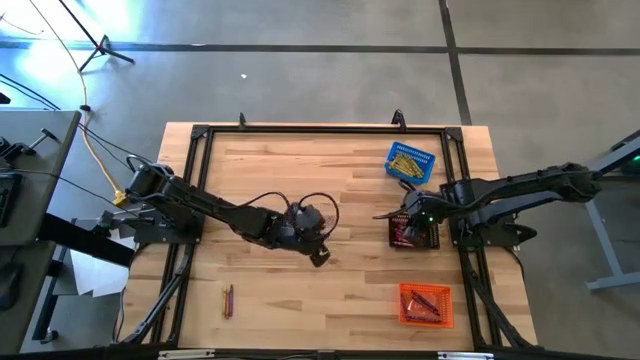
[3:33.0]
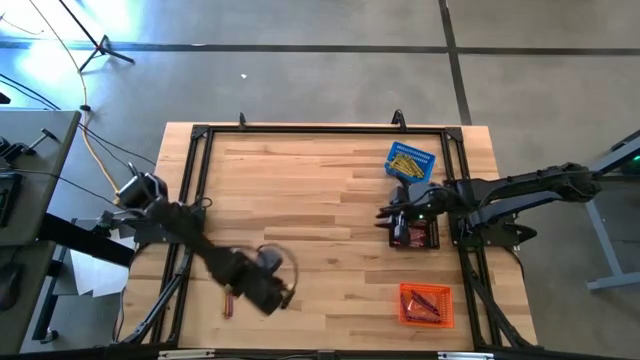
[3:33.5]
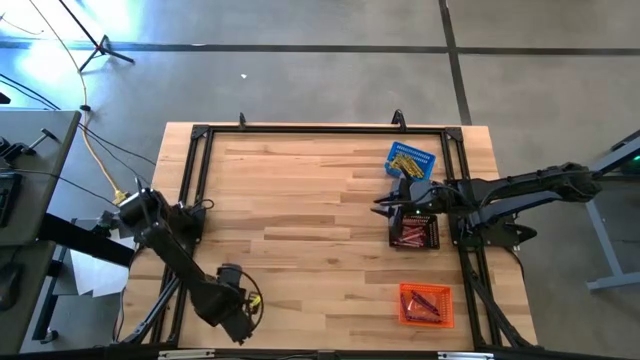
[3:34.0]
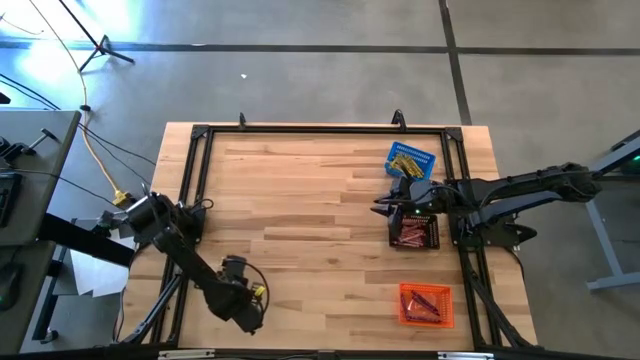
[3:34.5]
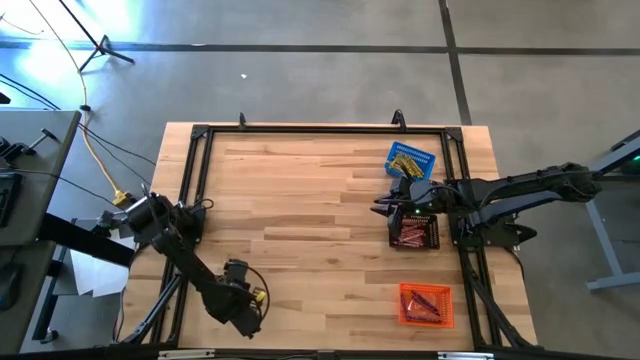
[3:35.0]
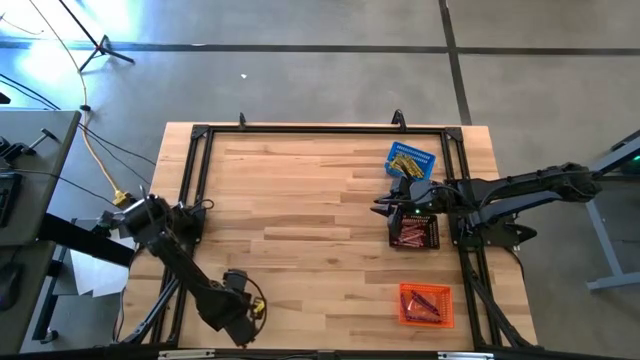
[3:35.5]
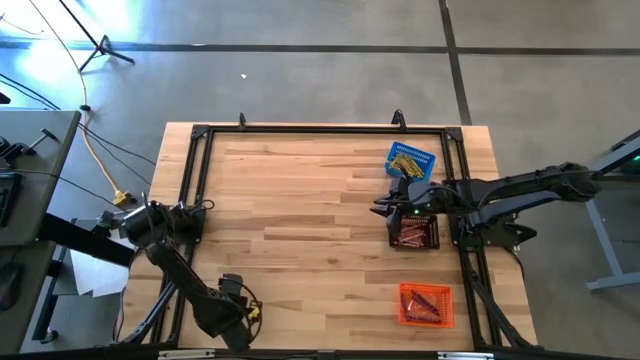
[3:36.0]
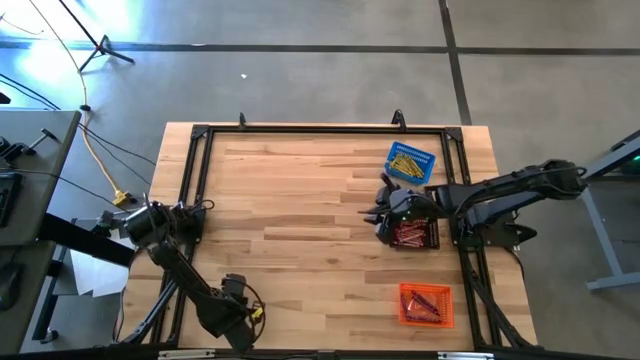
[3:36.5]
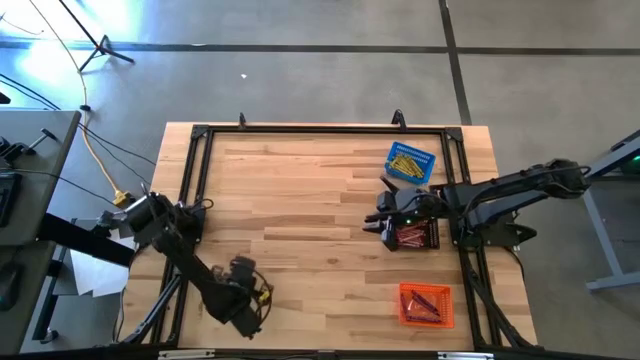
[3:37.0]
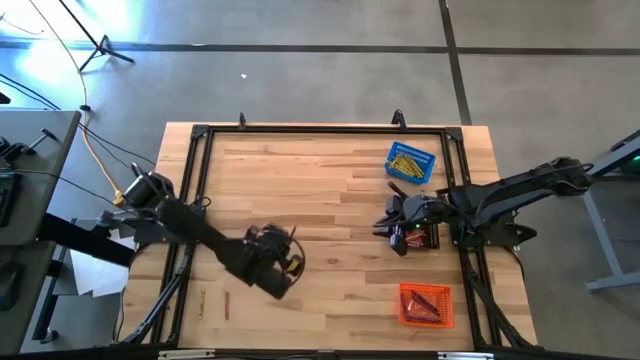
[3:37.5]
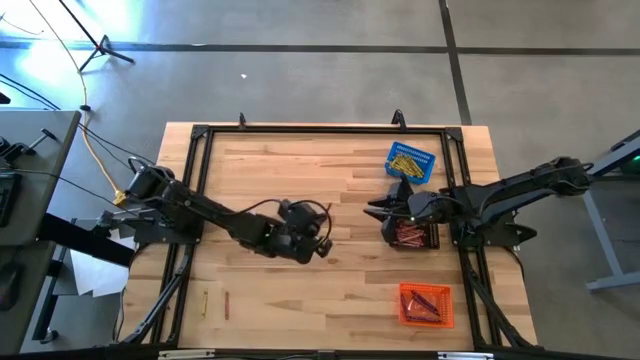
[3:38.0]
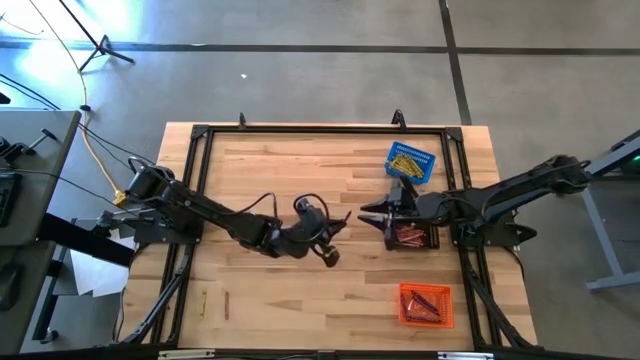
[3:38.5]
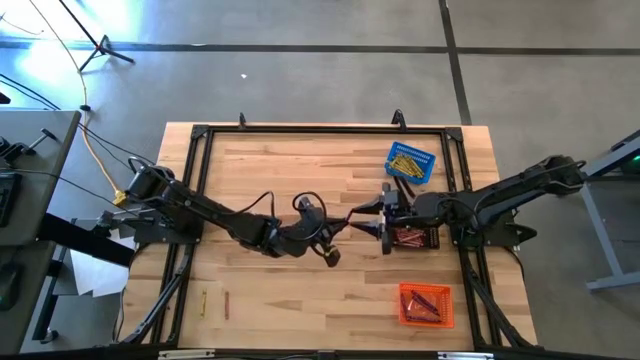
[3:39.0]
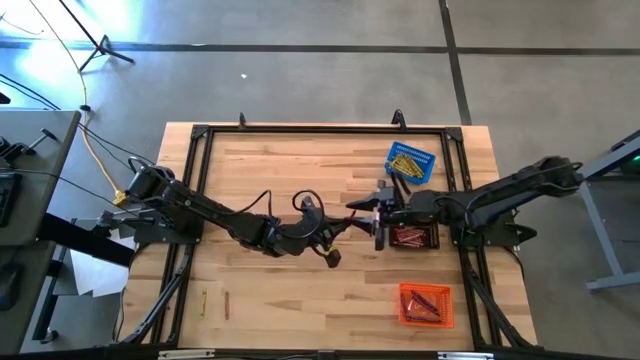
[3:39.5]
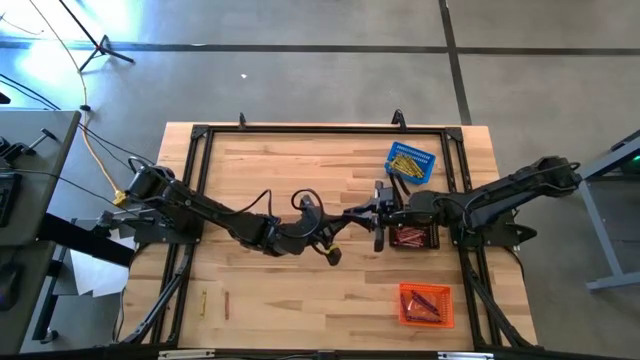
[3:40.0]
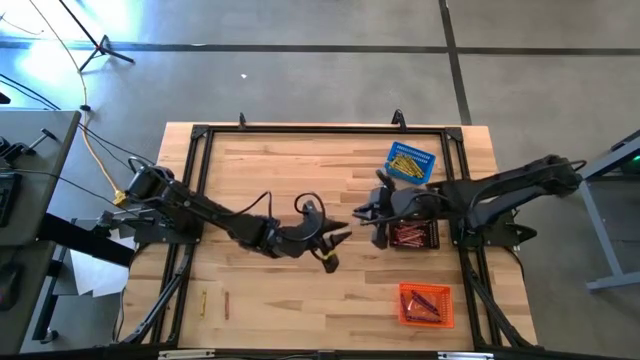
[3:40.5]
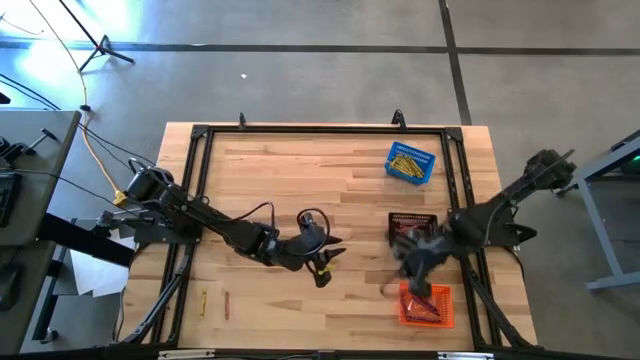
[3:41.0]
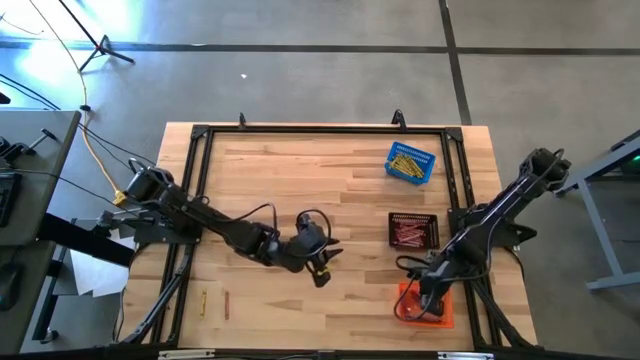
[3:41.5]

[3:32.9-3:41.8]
Task: Sort crayons
Put the violet crayon into the orange bin

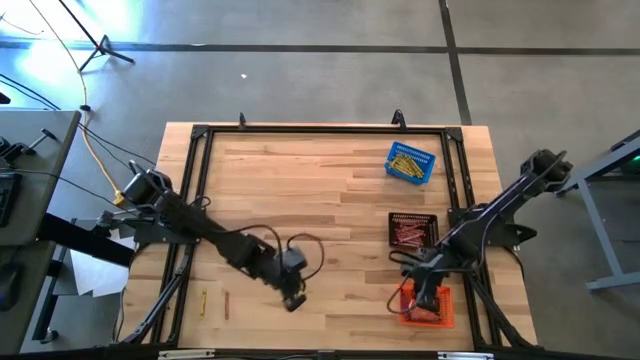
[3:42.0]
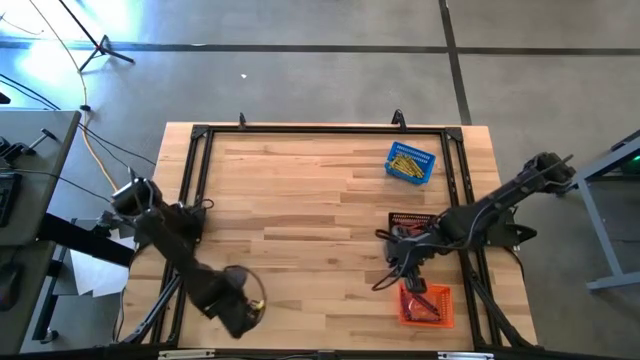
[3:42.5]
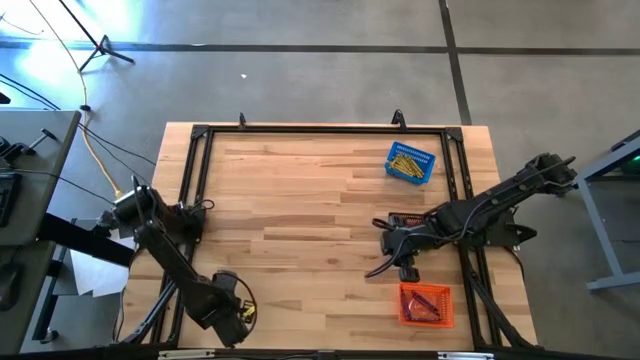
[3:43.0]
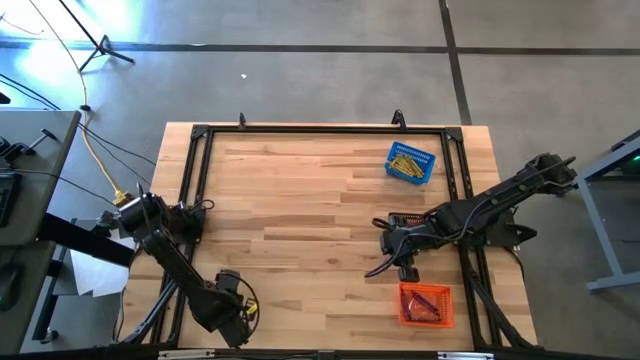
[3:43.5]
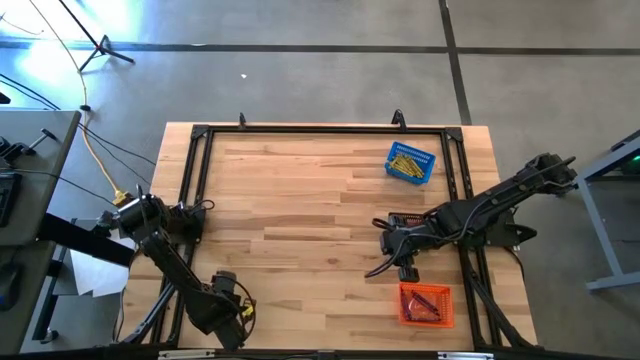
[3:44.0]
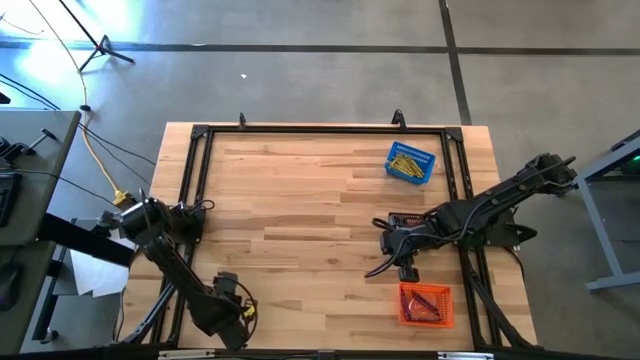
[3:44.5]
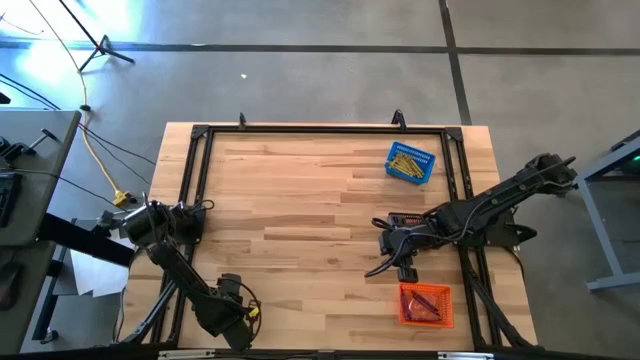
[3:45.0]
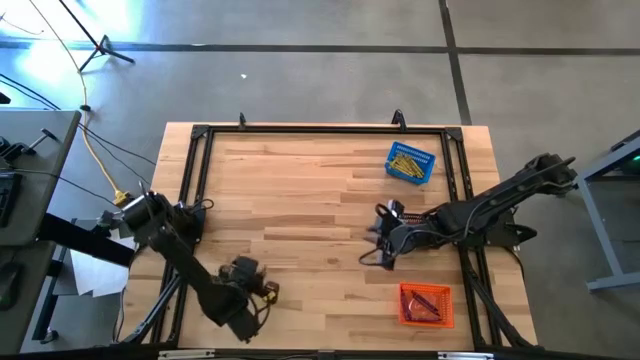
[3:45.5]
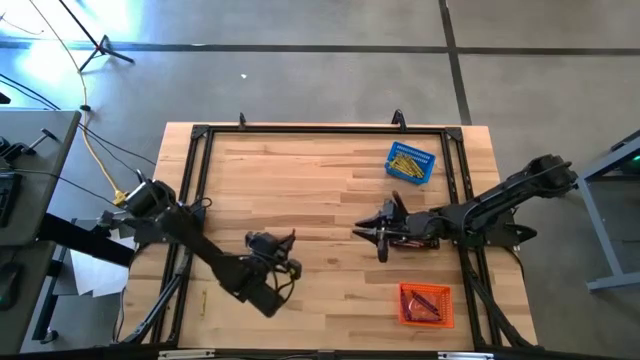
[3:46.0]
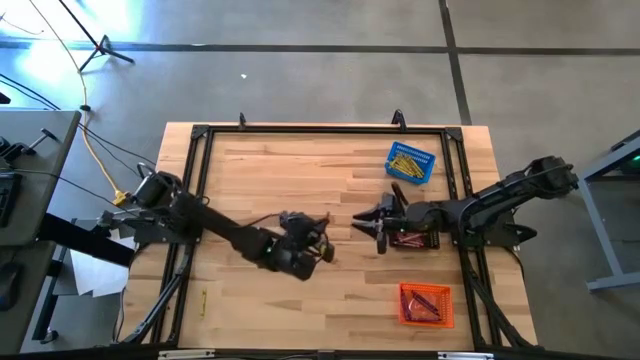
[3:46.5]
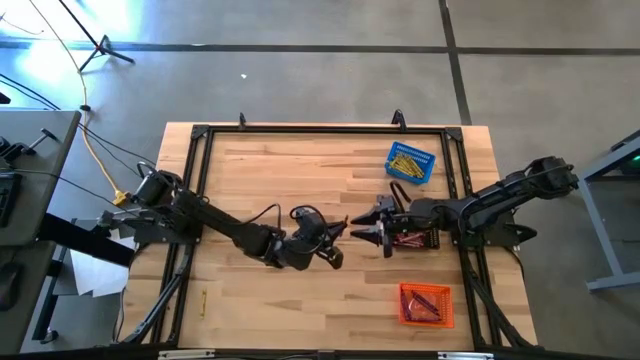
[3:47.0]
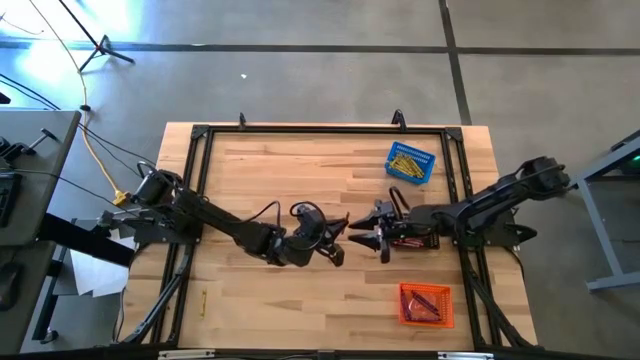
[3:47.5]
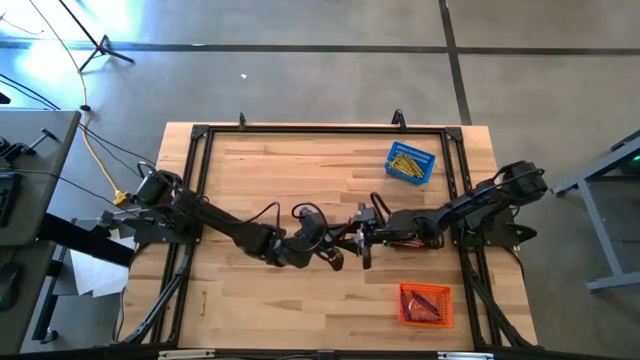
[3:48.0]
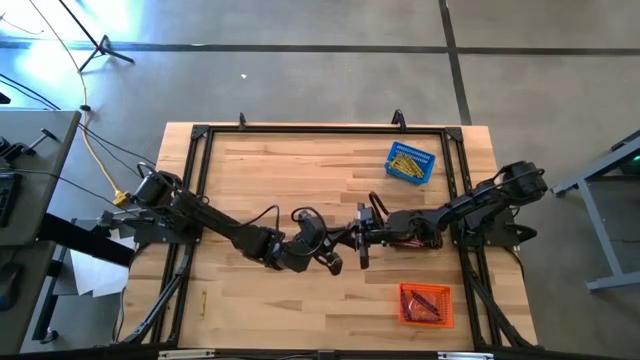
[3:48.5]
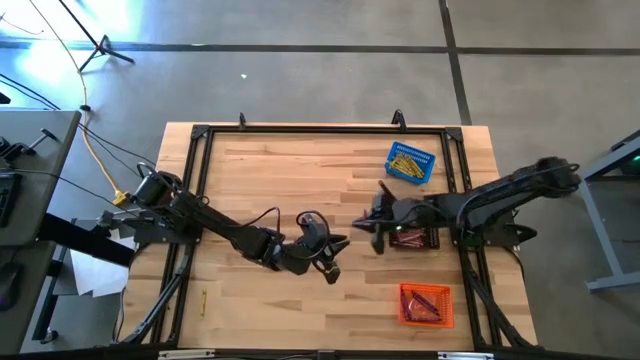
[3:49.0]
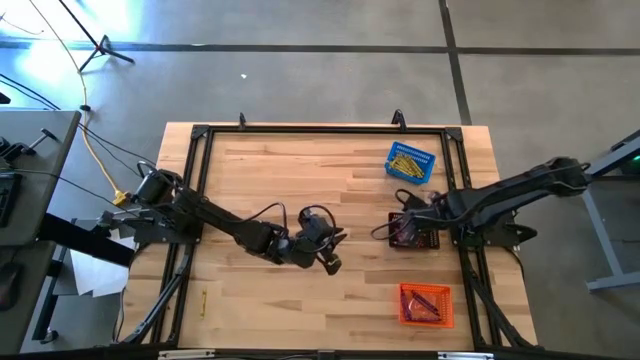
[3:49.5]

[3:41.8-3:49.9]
Put the red crayon into the black bin

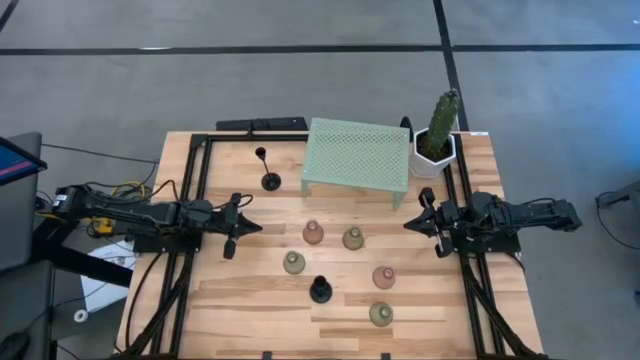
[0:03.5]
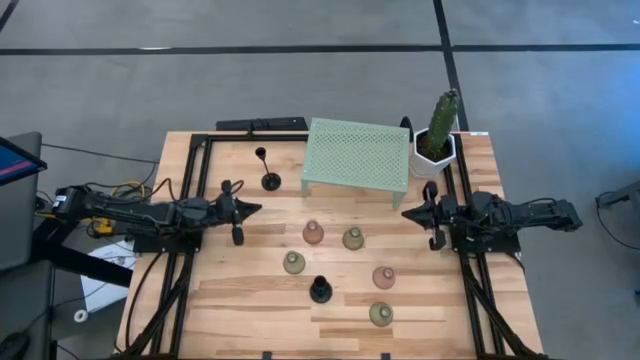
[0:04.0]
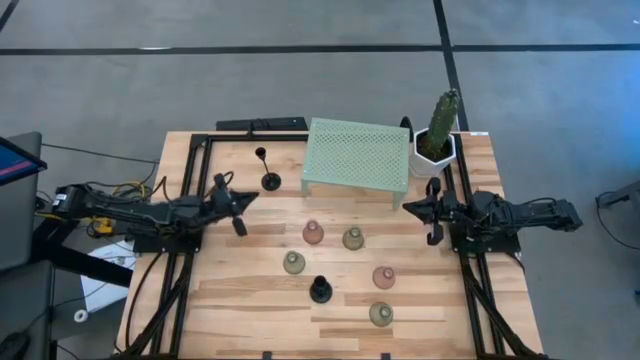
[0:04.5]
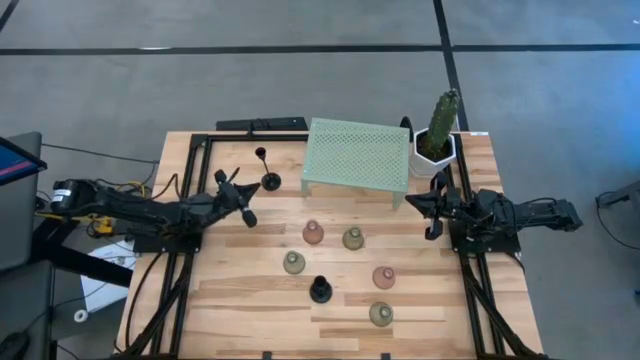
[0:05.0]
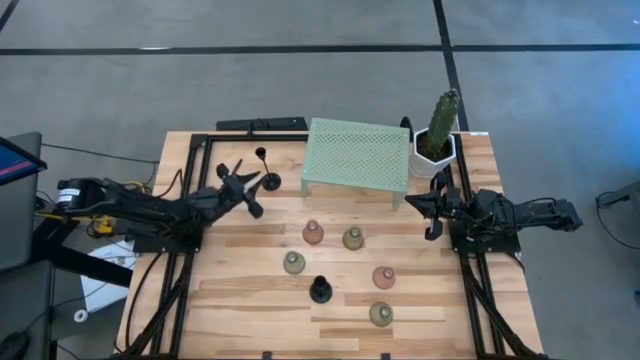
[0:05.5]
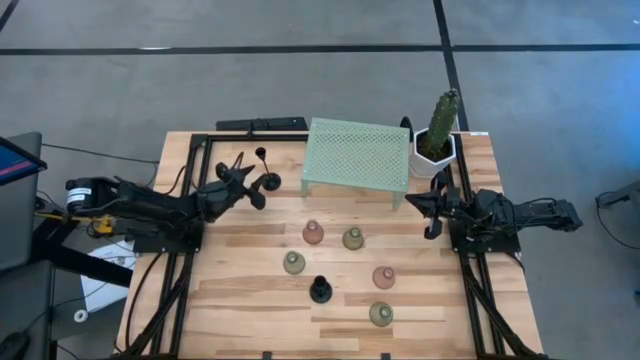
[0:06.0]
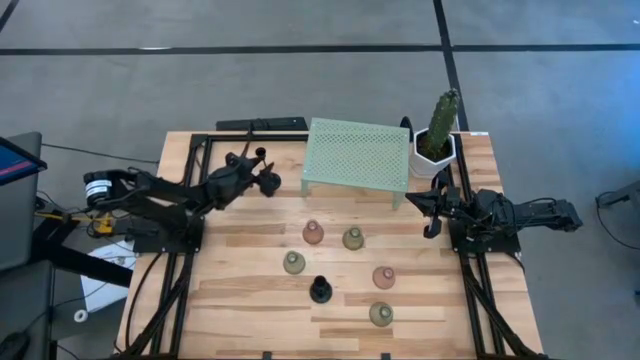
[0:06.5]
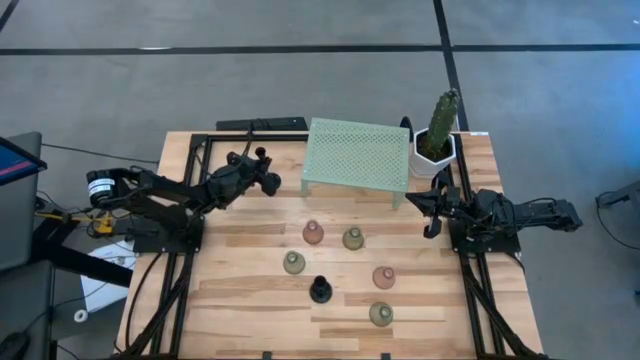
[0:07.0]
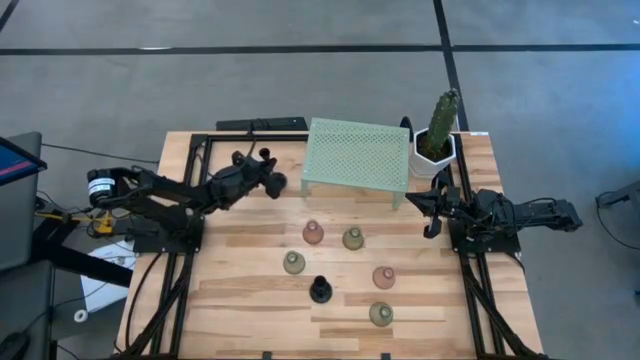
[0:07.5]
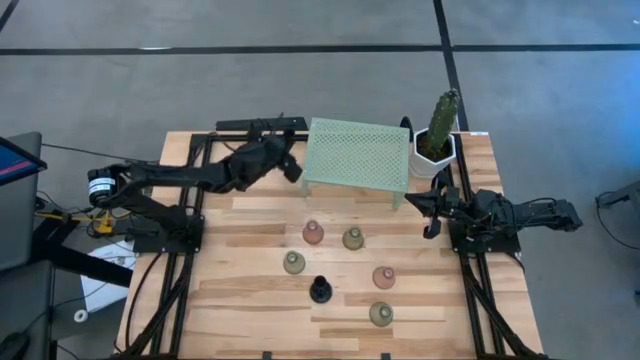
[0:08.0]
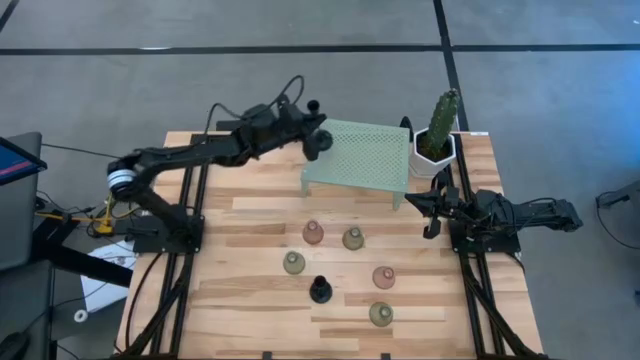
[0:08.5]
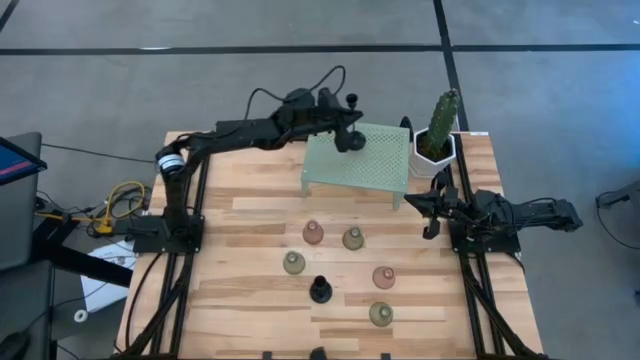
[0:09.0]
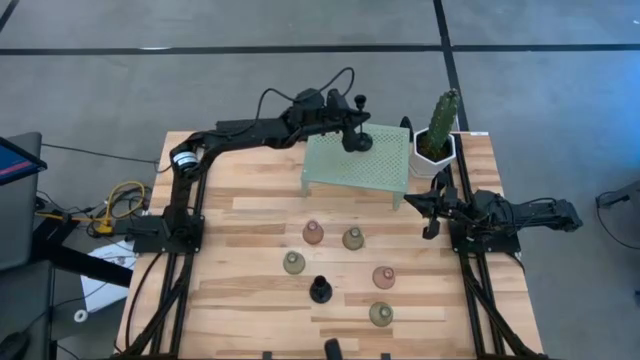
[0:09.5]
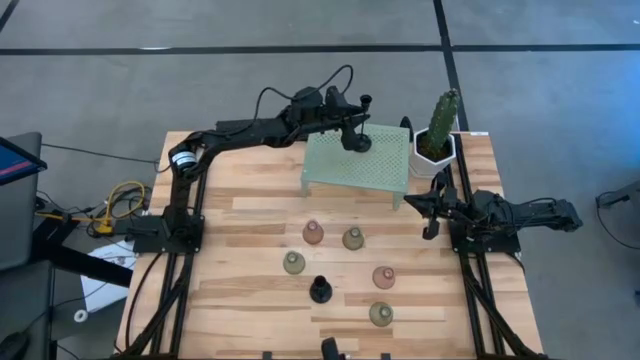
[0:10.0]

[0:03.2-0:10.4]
Task: Pick & Place candle stick holders
Put the top black candle holder on the shelf
